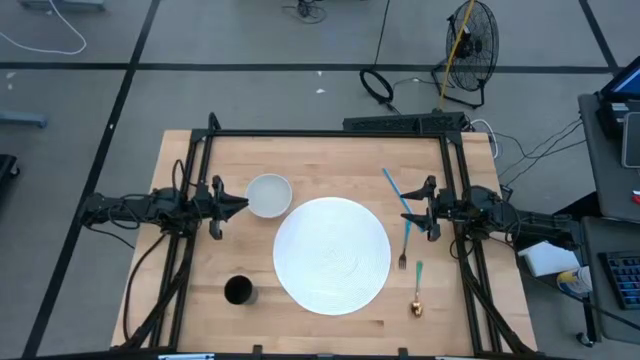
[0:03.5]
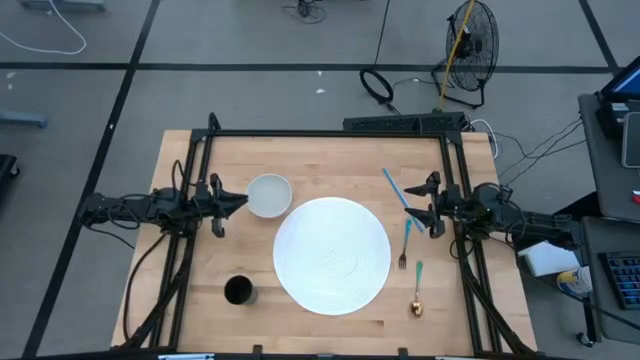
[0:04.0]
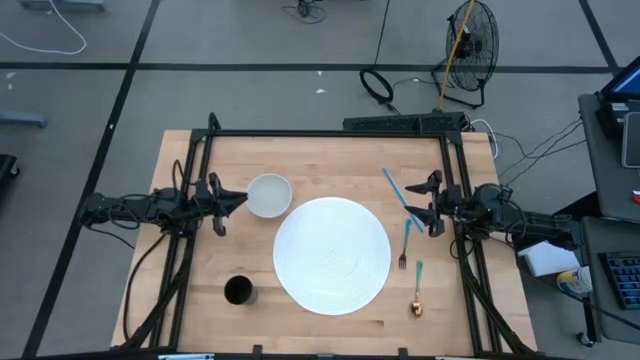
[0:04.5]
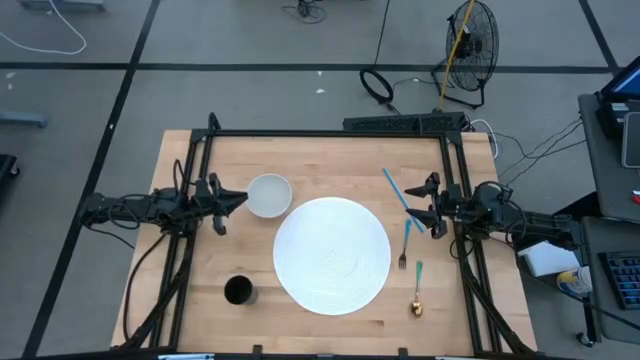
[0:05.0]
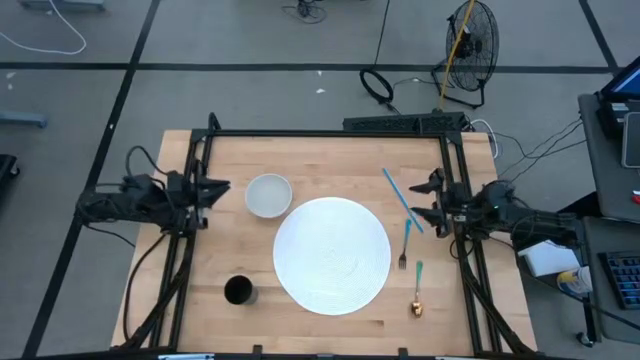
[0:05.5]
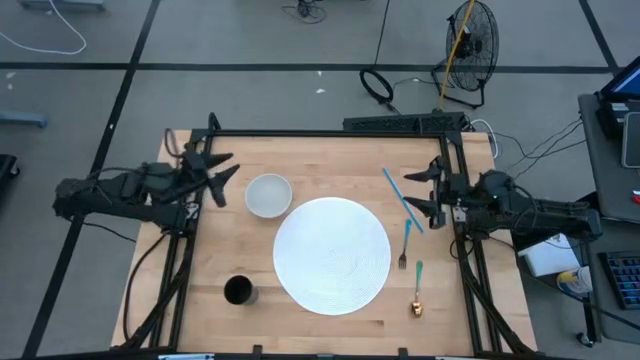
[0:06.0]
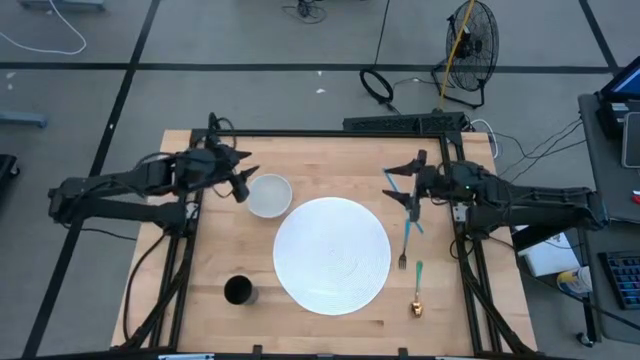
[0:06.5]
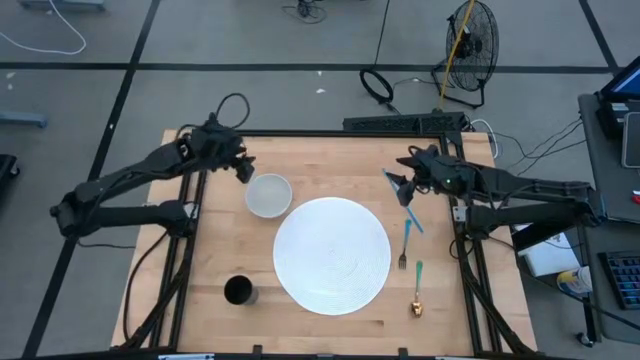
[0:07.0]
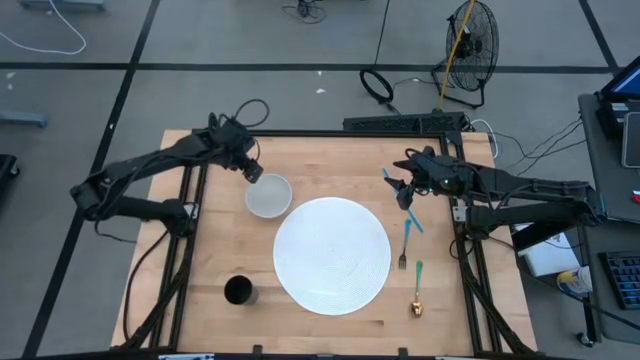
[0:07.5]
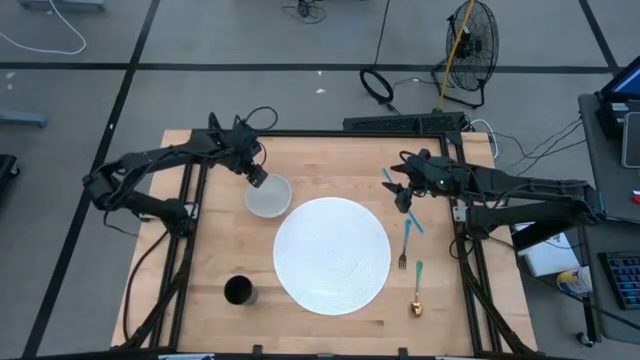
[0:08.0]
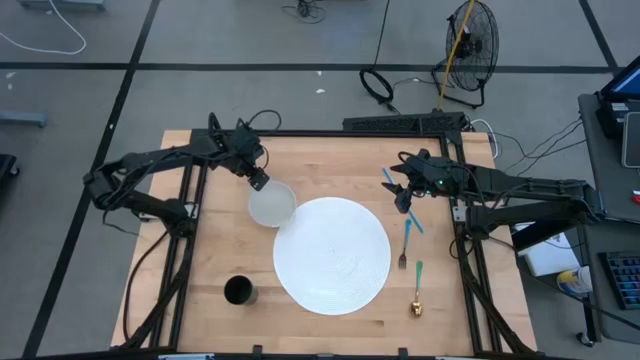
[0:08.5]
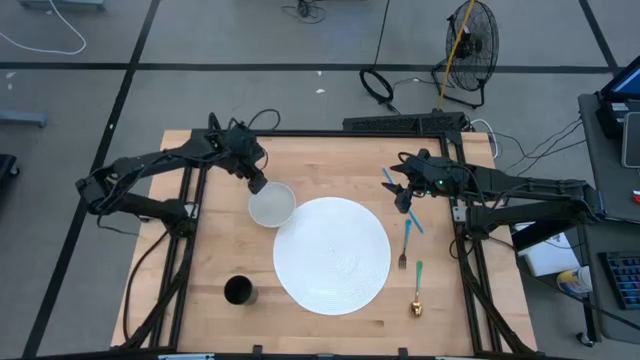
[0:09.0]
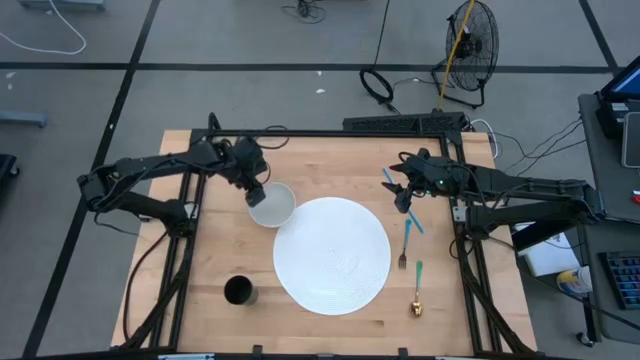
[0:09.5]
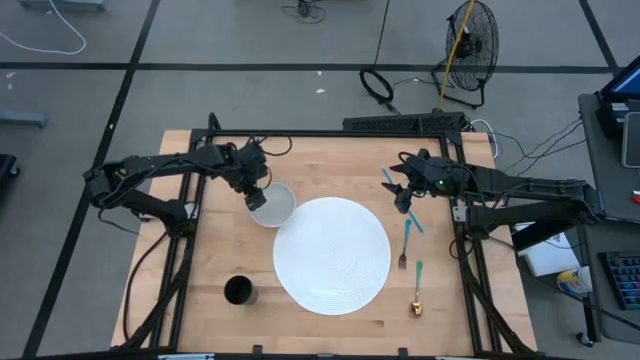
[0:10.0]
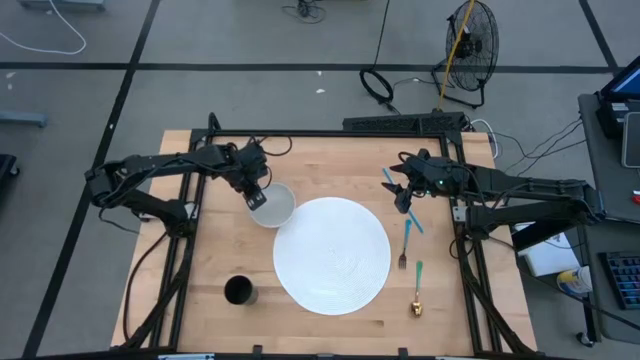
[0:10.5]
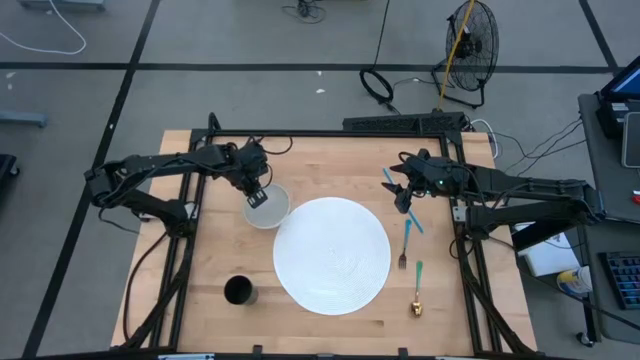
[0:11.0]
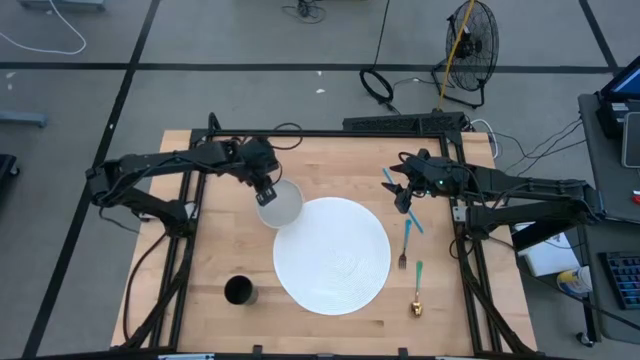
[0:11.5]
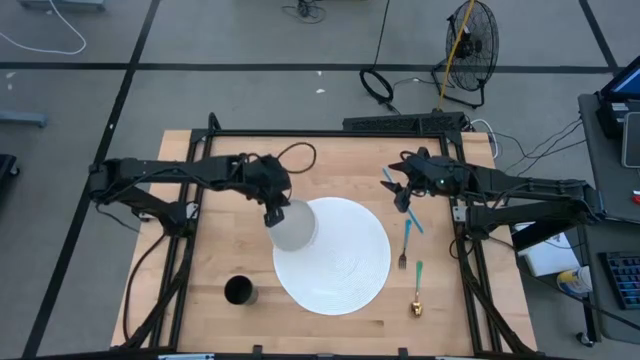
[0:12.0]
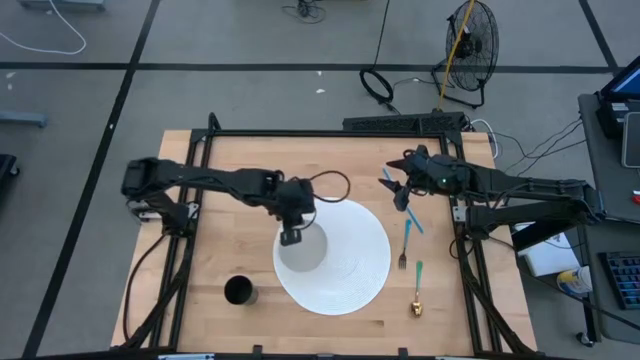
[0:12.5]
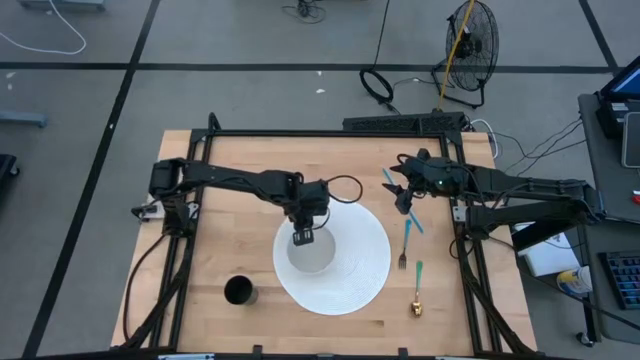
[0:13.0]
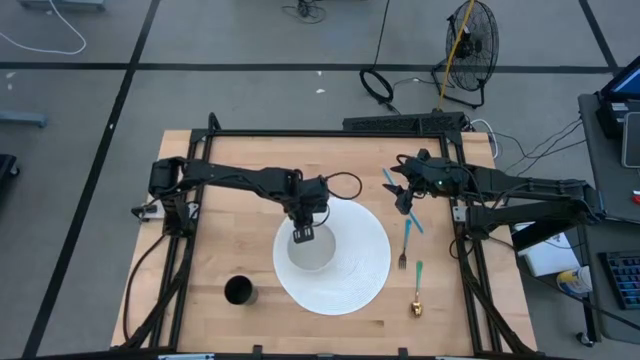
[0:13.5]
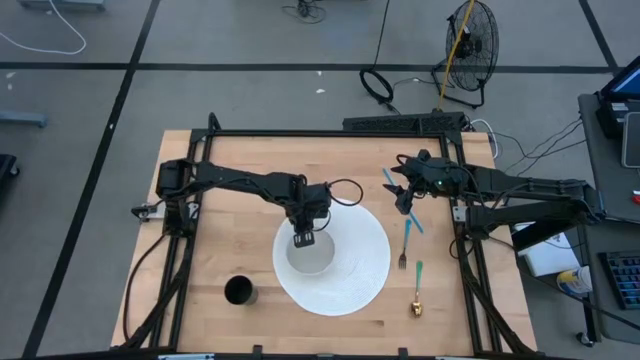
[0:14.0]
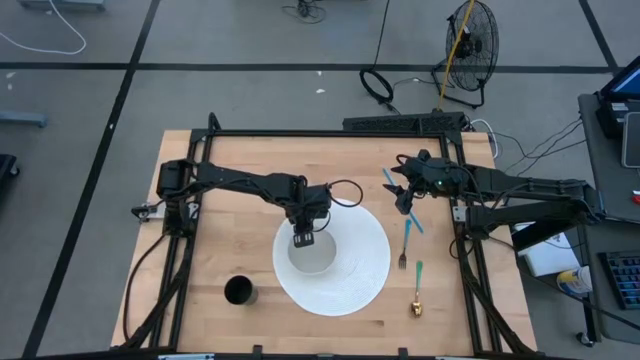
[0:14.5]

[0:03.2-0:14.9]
Task: Pick & Place Utensil
Put the white bowl on the white mat

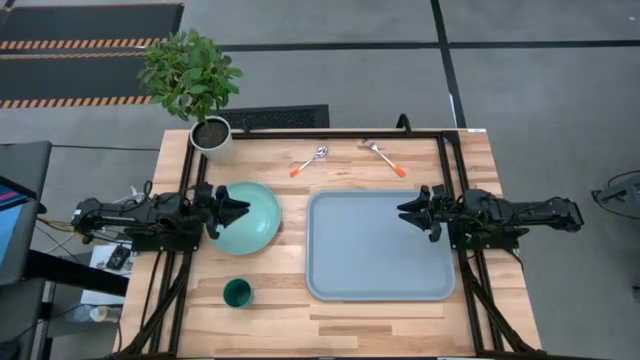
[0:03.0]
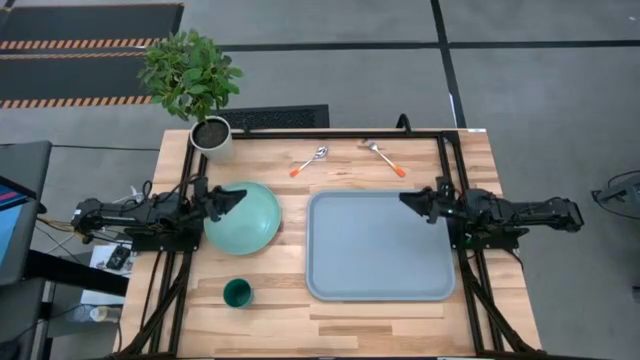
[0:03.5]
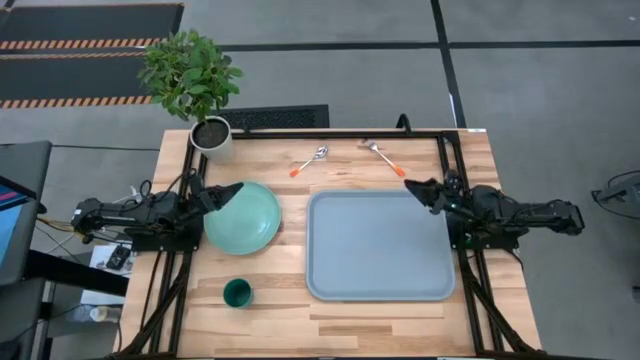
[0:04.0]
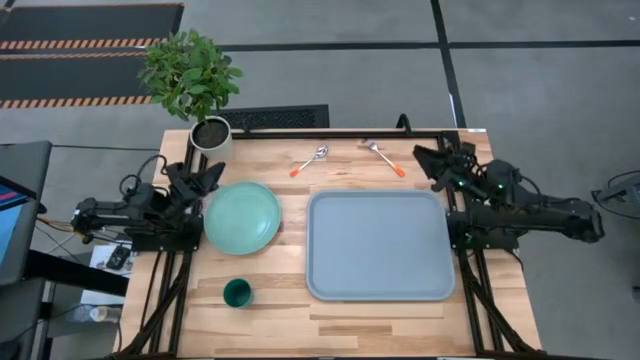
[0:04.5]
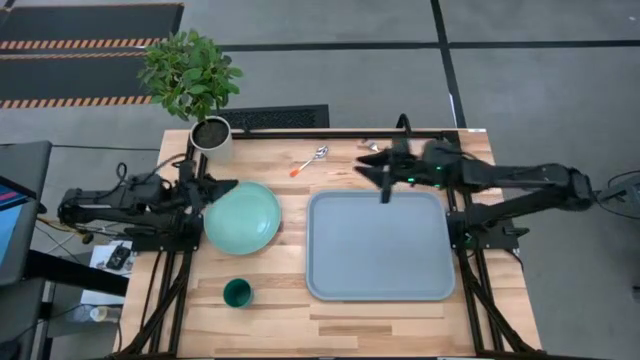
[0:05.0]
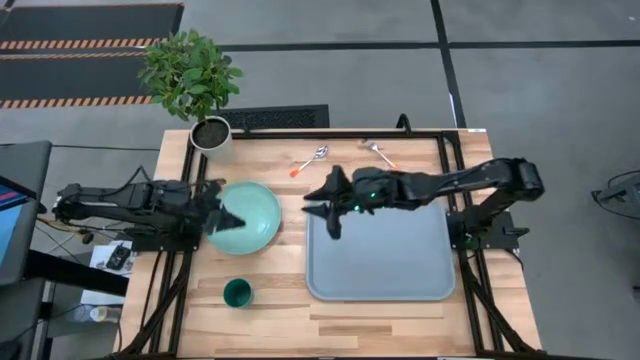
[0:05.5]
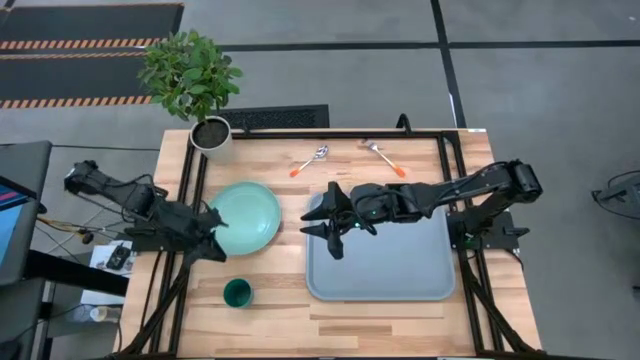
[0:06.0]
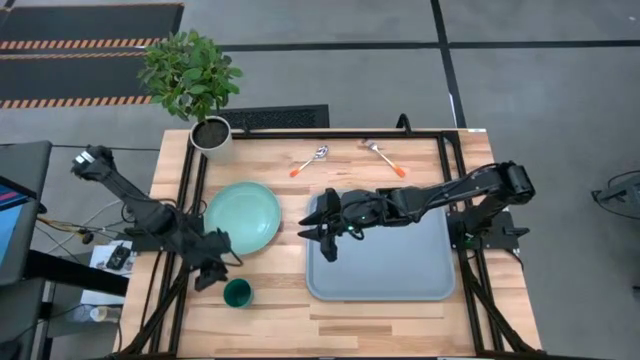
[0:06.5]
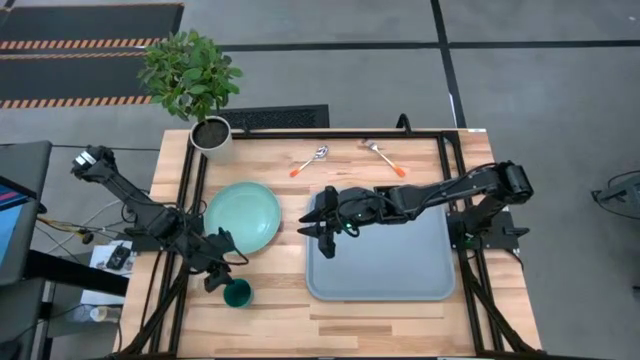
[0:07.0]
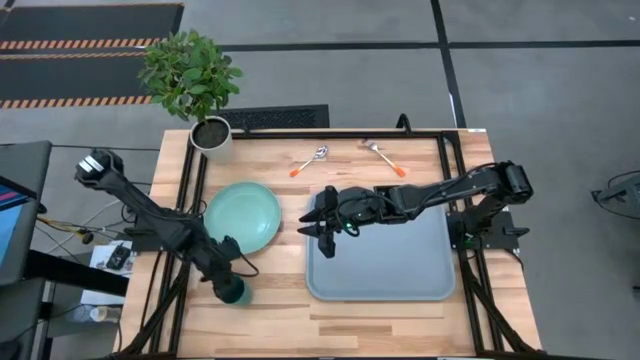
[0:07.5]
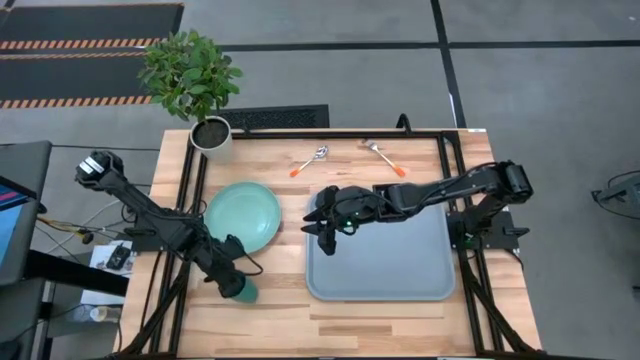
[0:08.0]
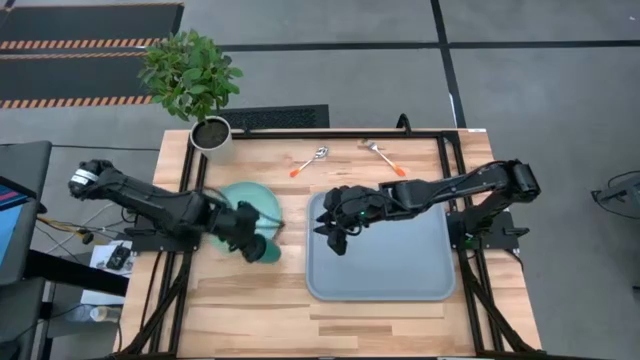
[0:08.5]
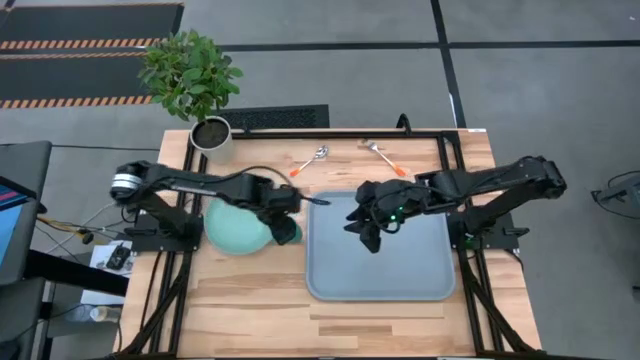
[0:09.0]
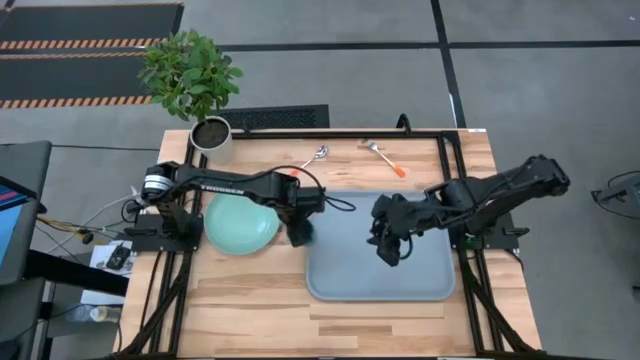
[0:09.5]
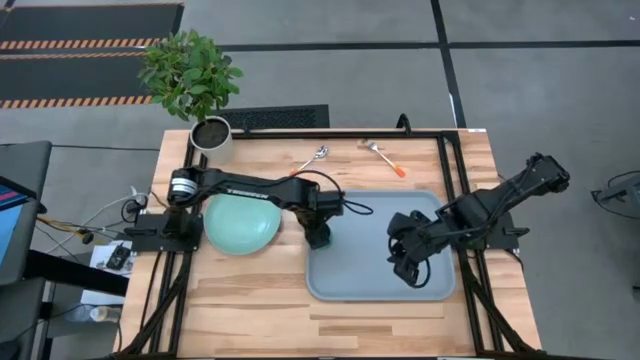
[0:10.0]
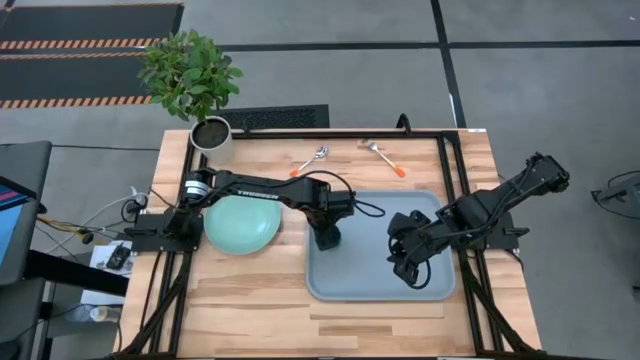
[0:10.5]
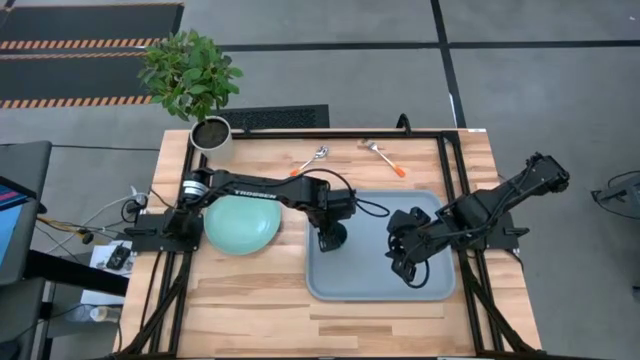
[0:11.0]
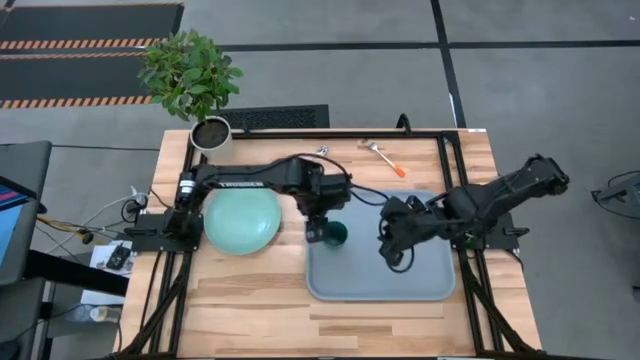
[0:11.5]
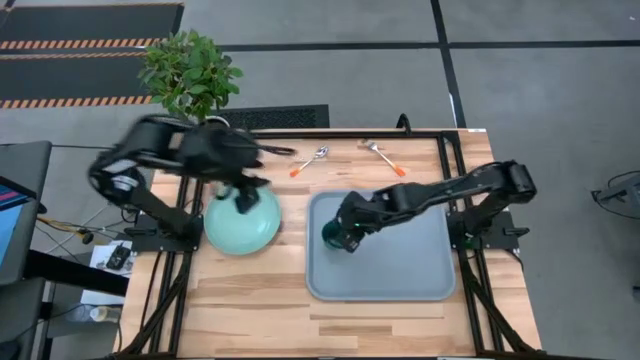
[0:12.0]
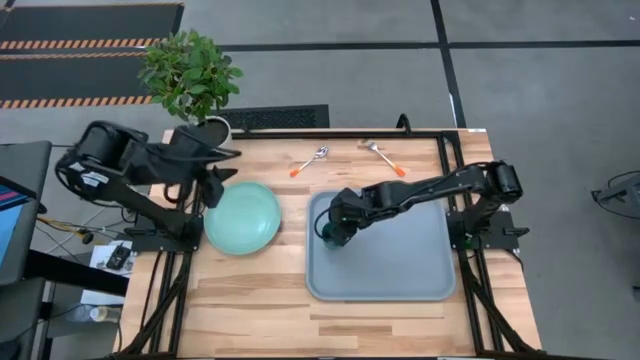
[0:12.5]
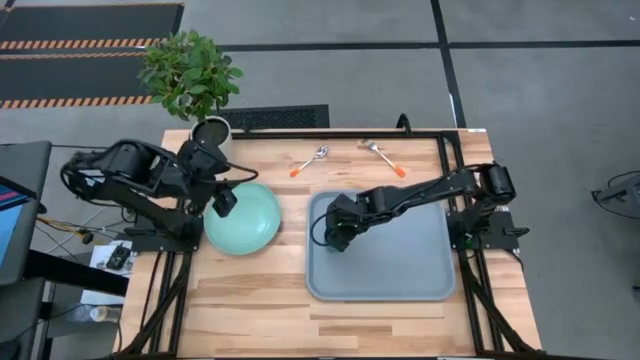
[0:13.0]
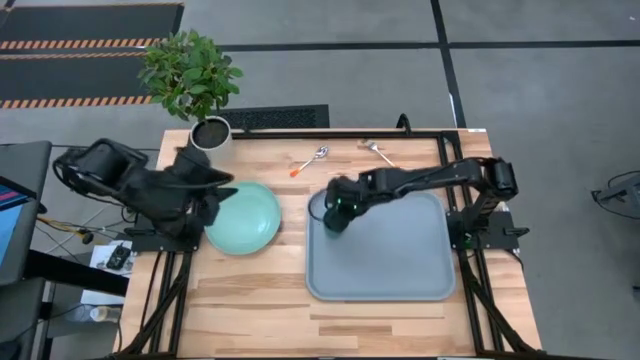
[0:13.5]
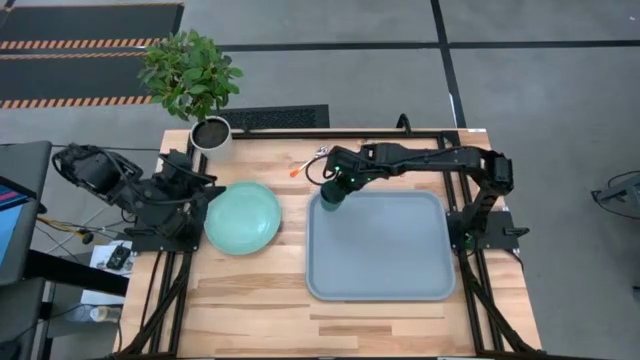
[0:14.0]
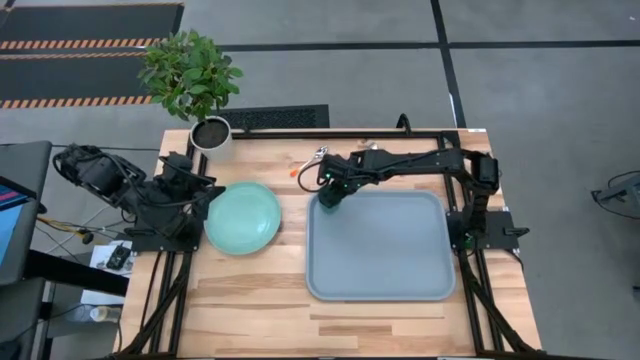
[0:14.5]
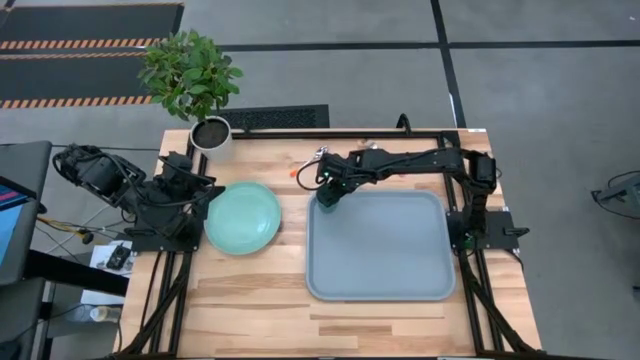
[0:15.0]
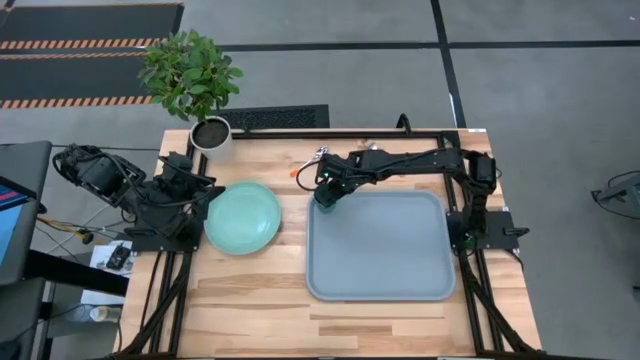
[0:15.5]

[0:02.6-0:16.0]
Task: Pick and place plate/cup/fork/spoon on tray
Put the green cup on the blue tray
